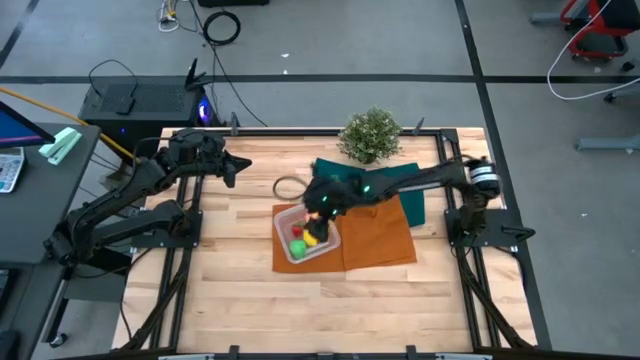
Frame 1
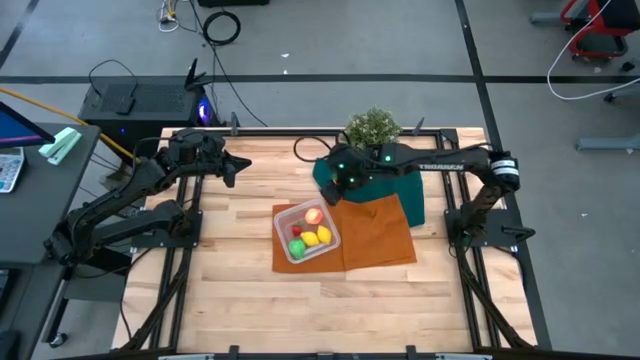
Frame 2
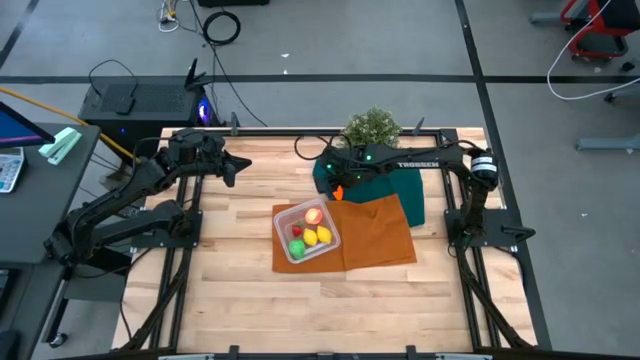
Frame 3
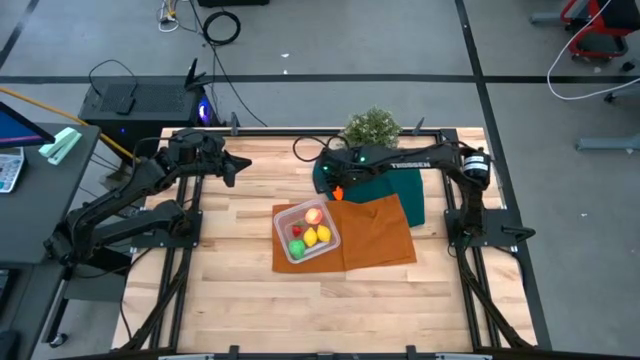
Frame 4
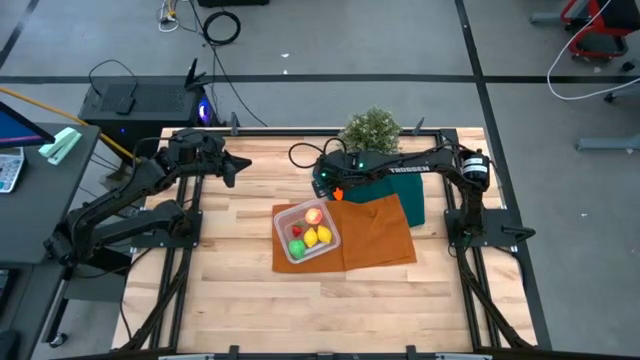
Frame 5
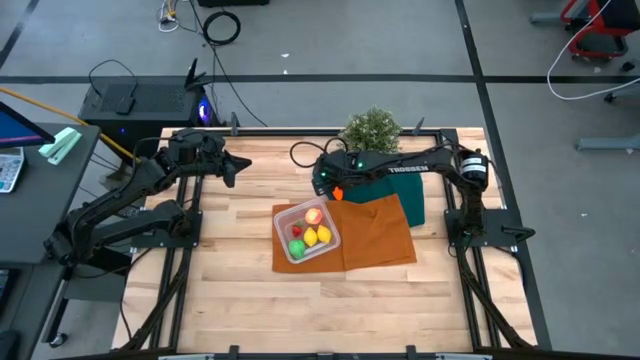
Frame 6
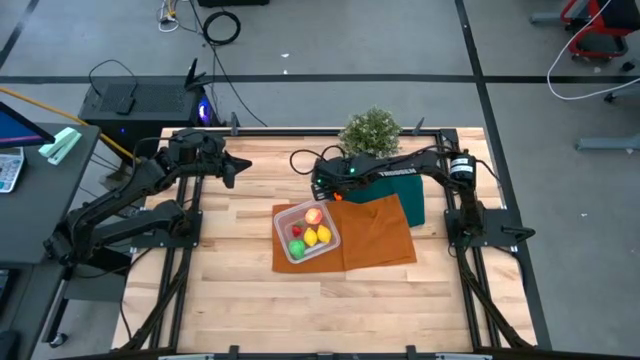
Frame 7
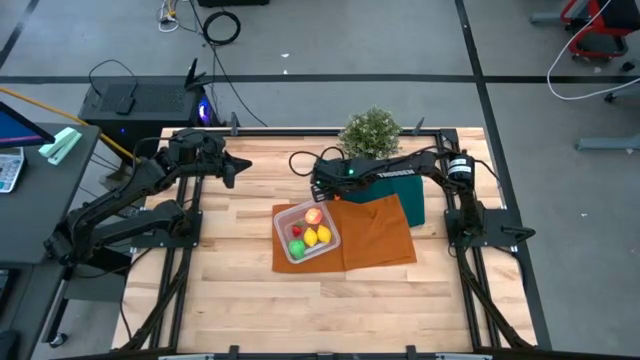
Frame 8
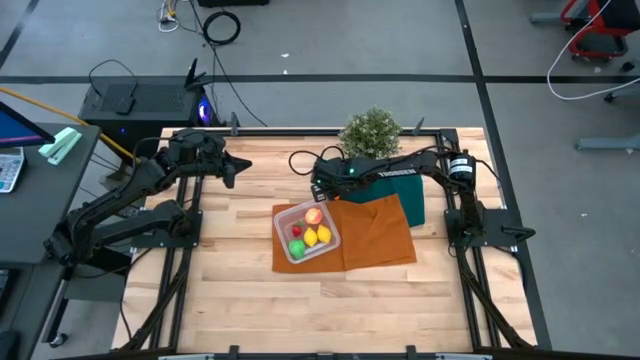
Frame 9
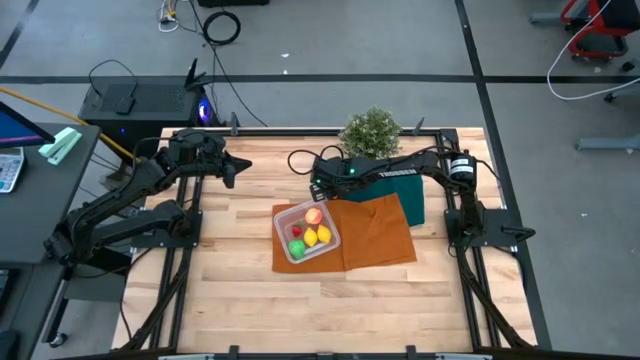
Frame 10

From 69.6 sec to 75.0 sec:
Task: Pick and placing Produce into tupperware
Put the orange carrot into the transparent bin

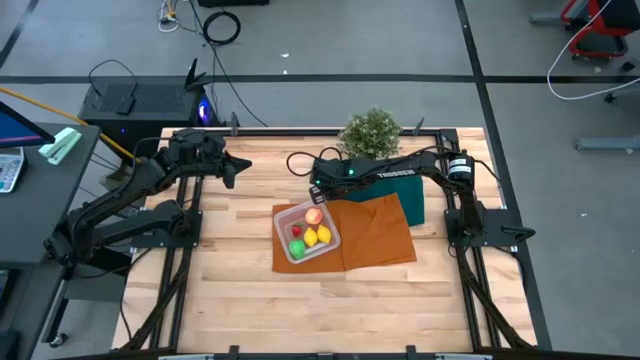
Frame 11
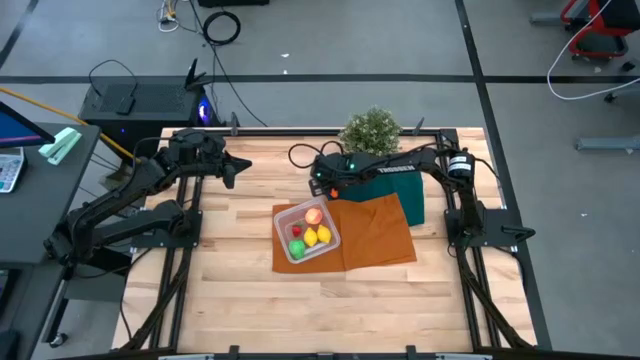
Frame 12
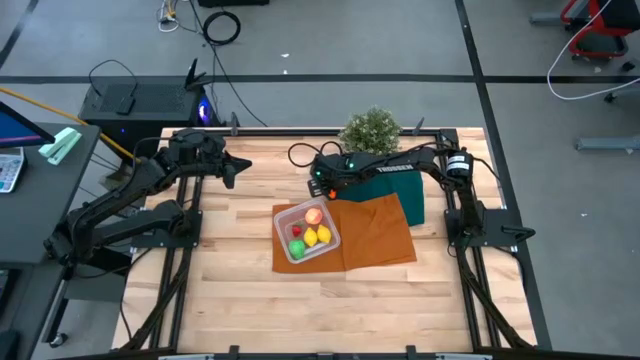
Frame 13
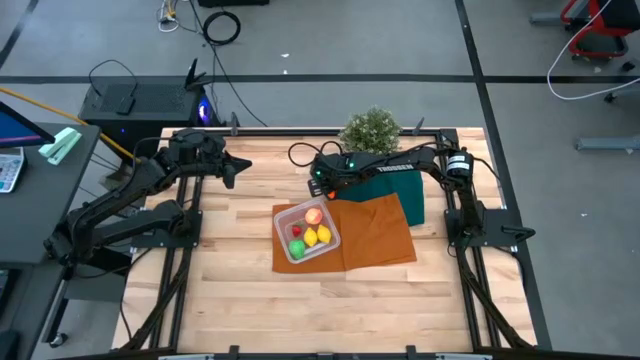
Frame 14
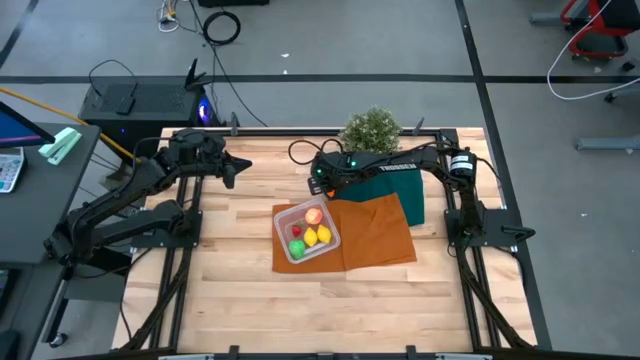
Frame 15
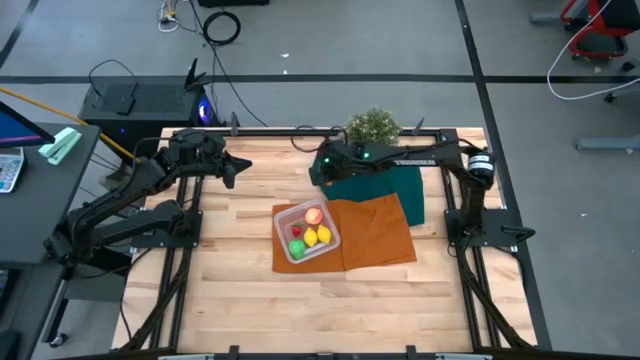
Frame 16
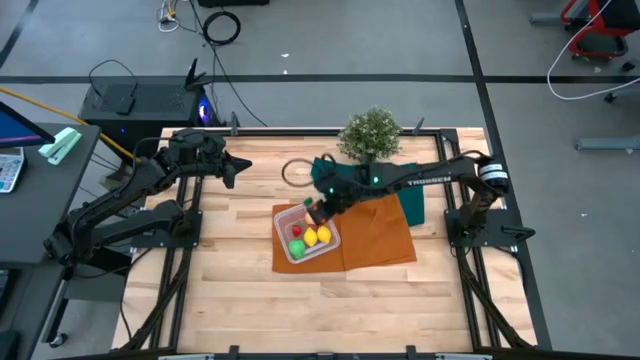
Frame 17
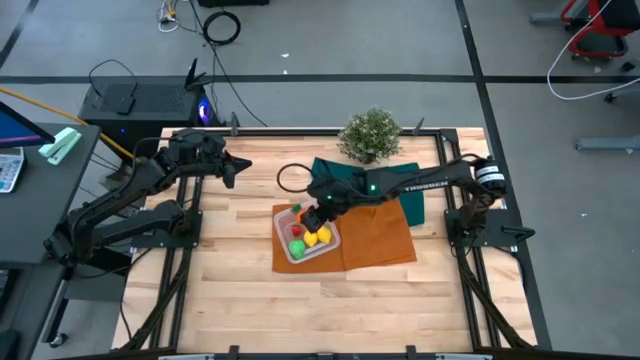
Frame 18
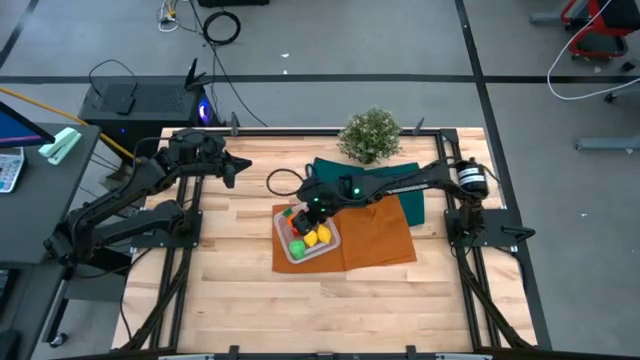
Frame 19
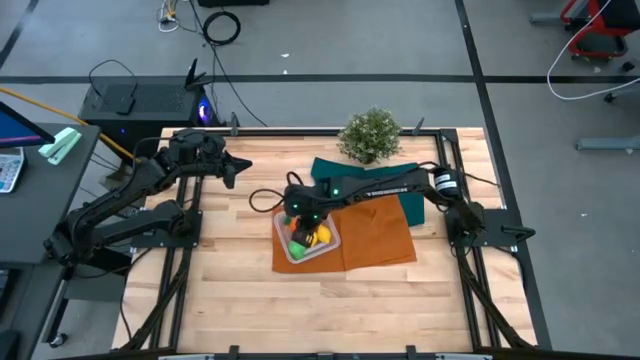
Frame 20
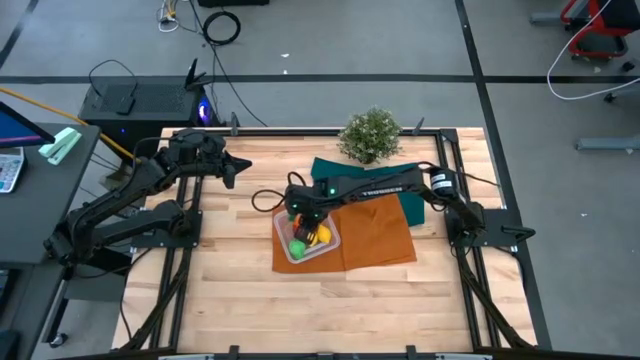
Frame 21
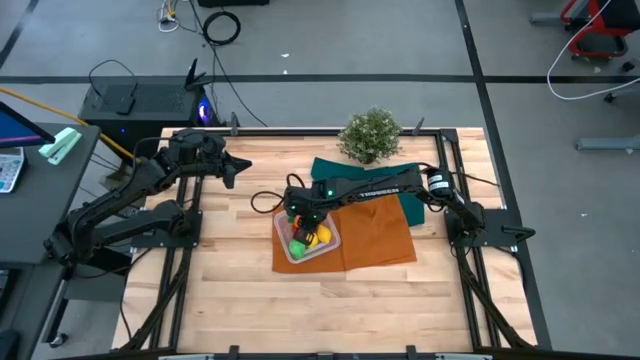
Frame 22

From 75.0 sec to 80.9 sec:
Put the orange carrot into the transparent bin

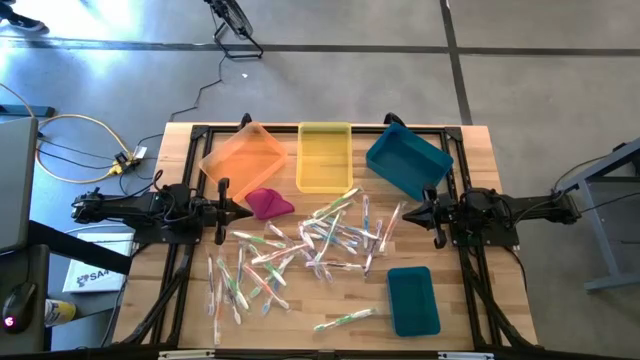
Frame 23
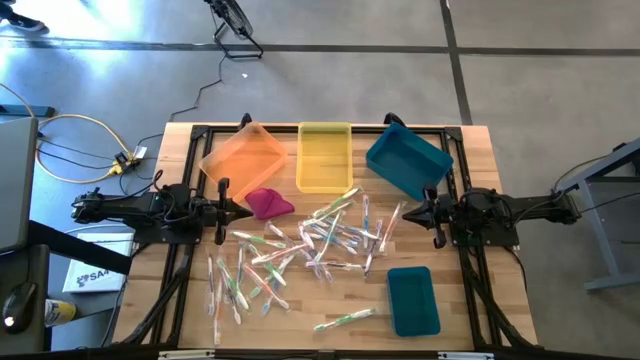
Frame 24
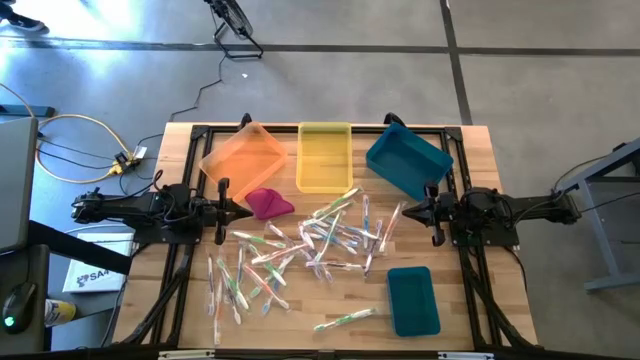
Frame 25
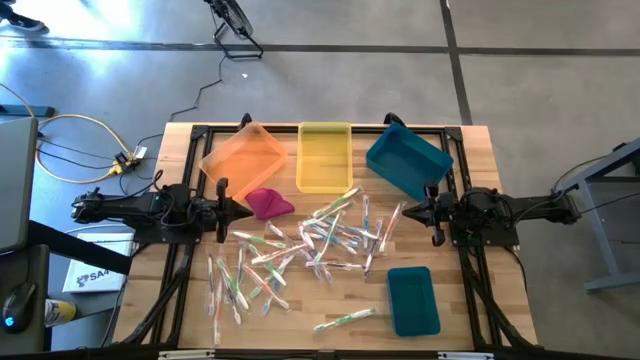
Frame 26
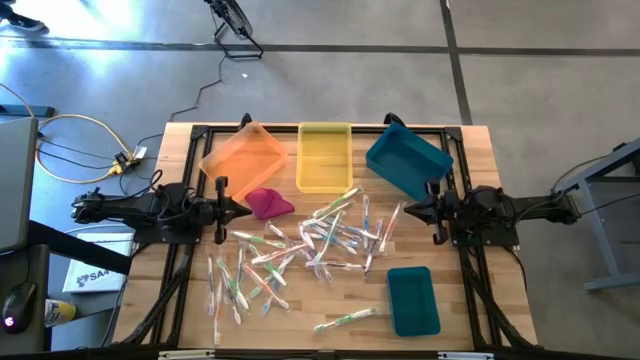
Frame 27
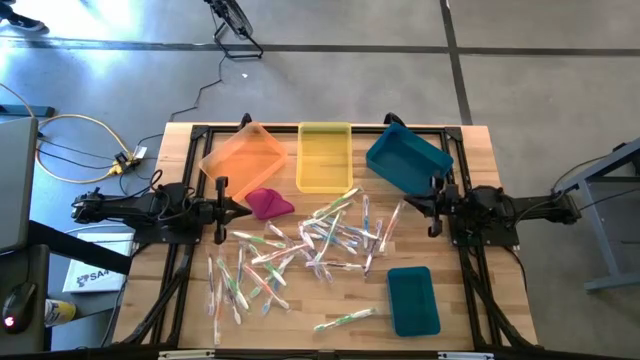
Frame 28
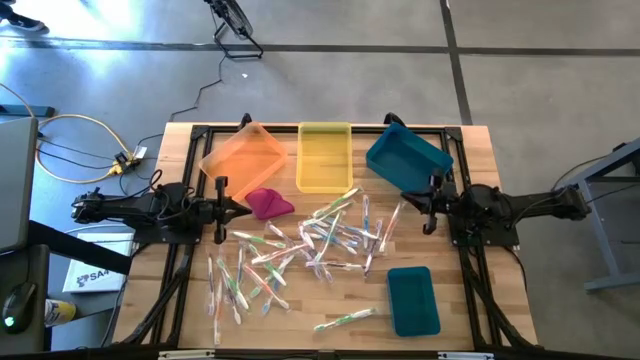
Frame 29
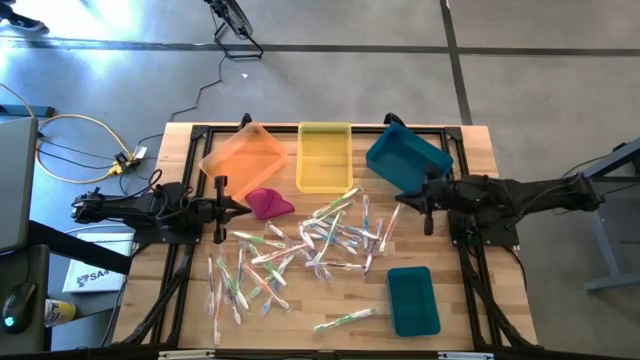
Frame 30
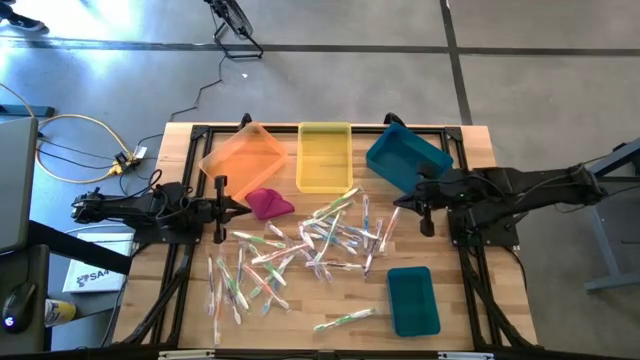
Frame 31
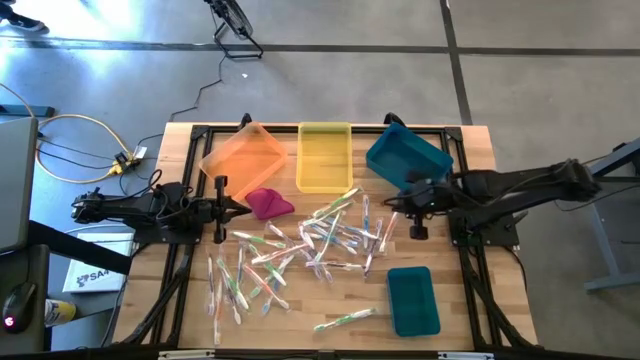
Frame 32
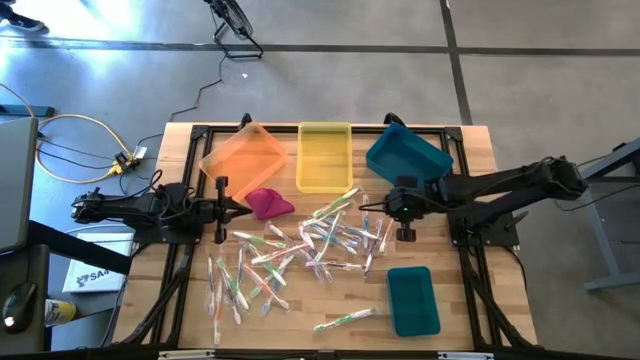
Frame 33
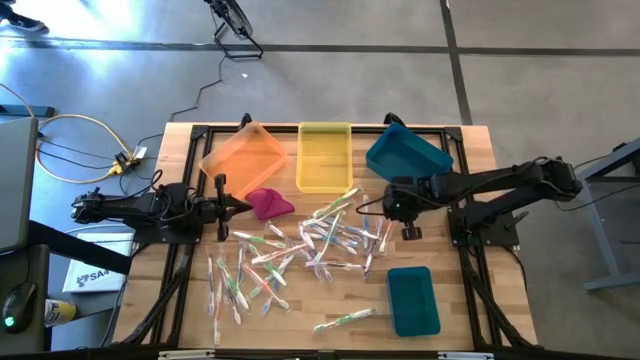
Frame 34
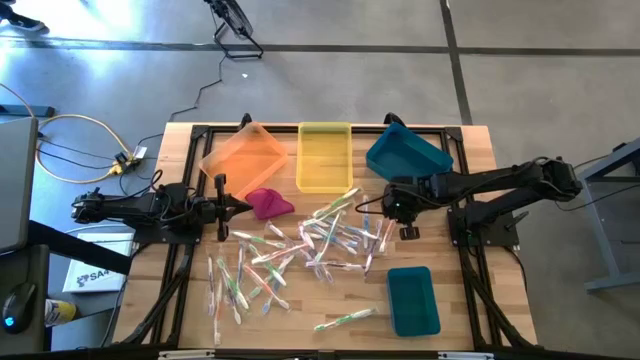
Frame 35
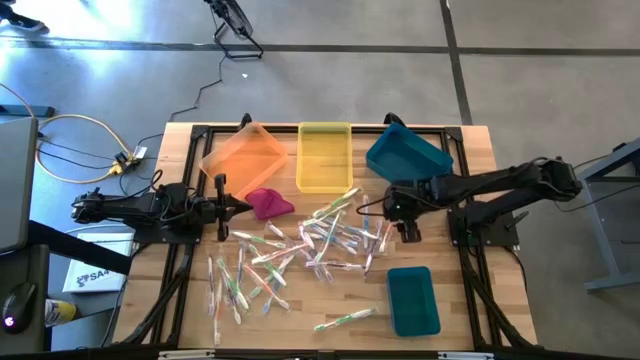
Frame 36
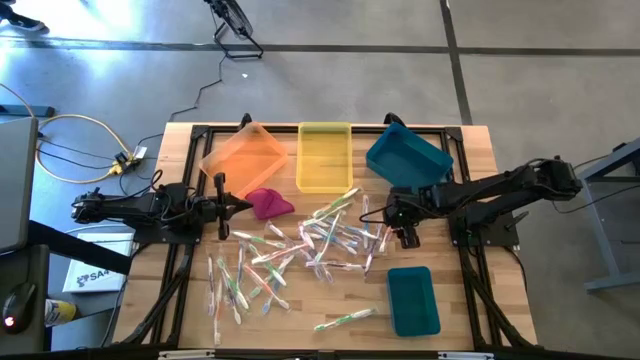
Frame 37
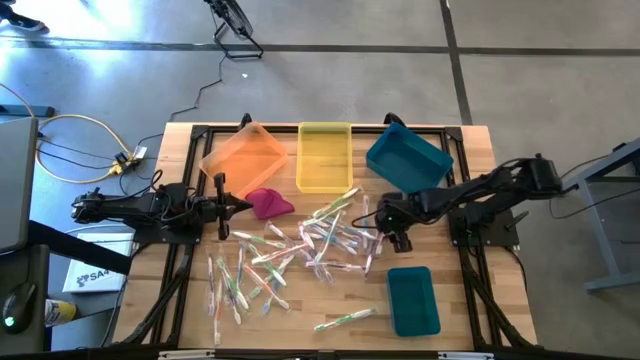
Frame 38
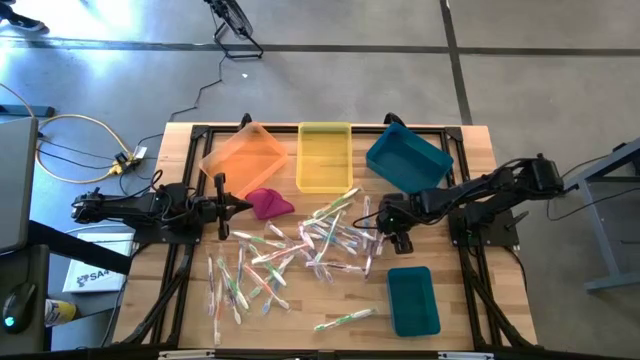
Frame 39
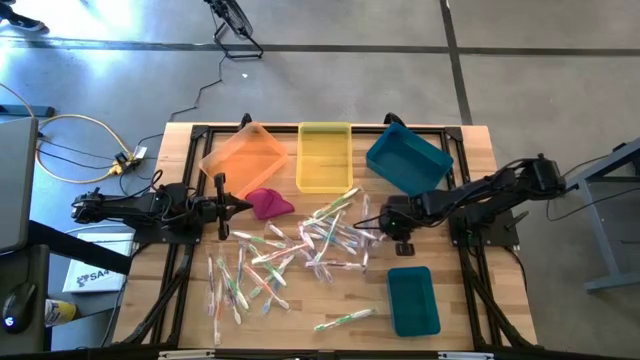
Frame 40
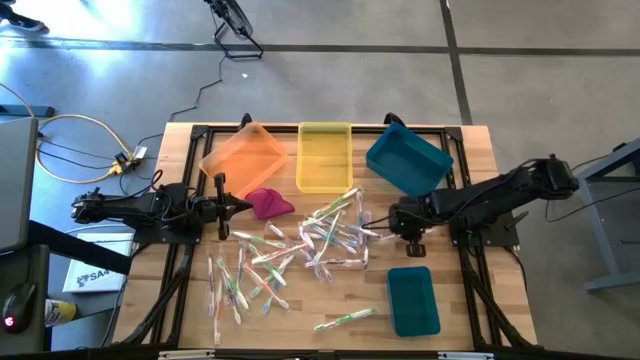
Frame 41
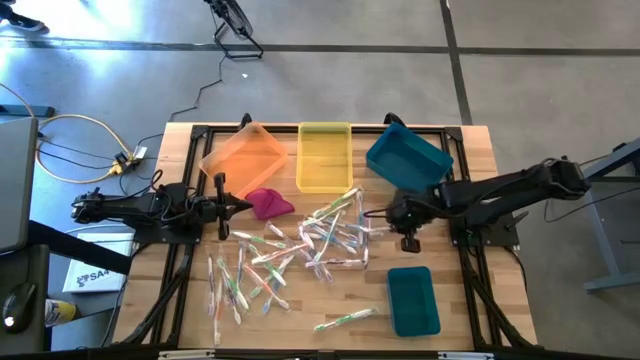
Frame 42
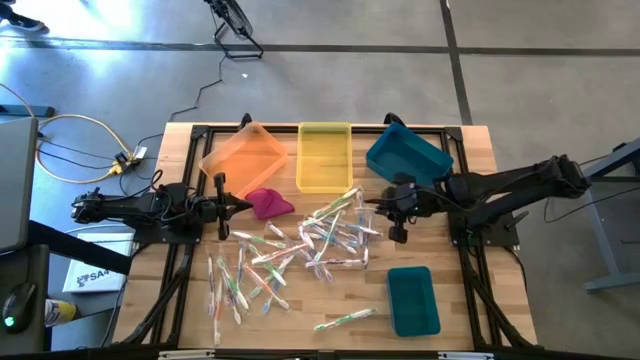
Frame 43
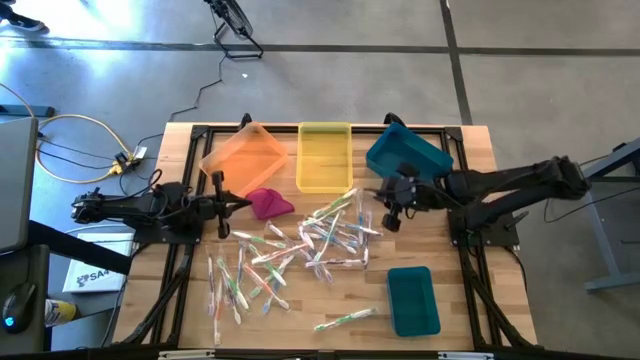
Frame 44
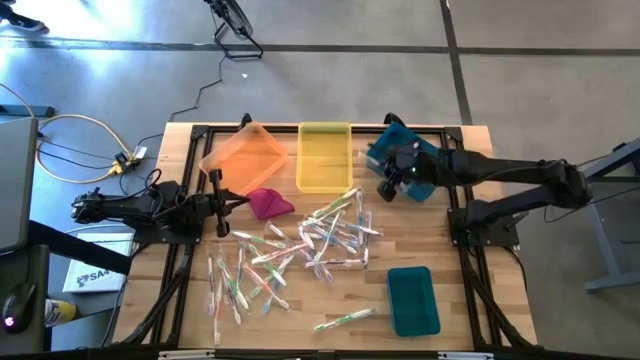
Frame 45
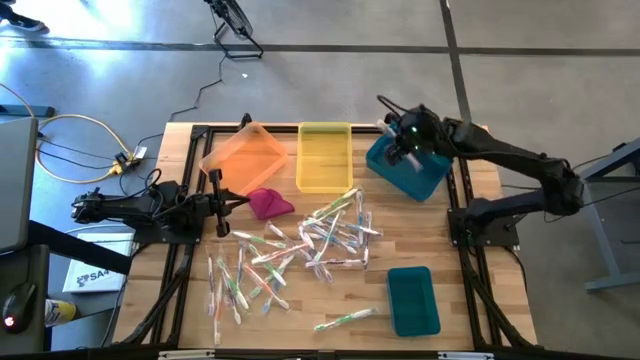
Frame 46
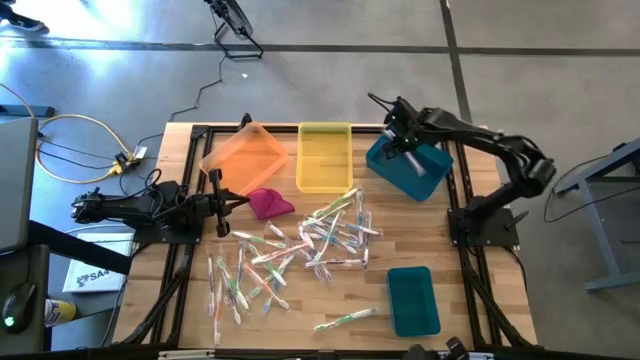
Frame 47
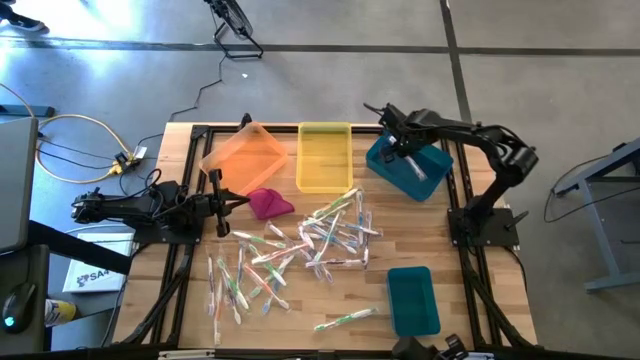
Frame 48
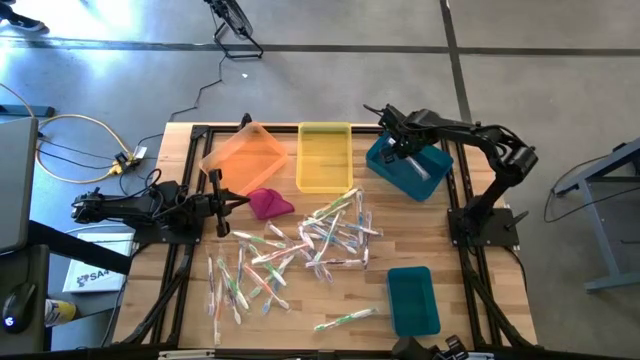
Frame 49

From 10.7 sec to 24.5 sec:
Task: Pick & Place Toothbrushes
Put the orange toothbrush into the top blue bin
